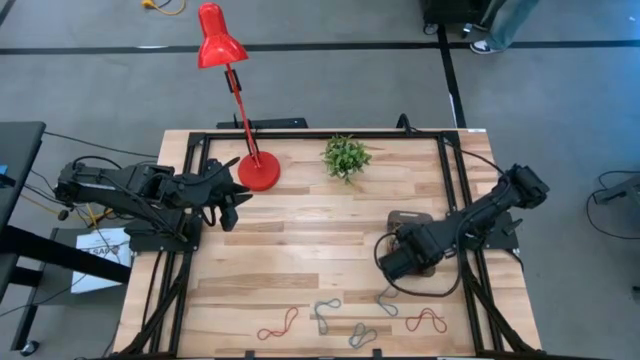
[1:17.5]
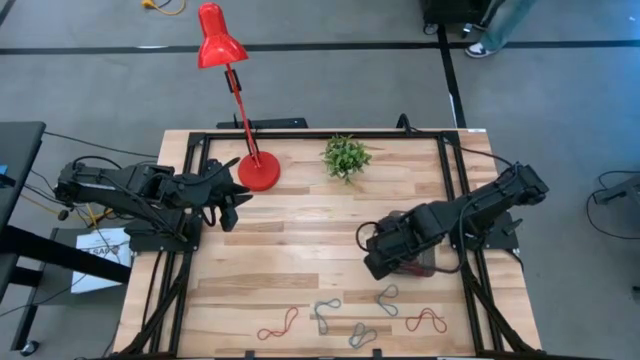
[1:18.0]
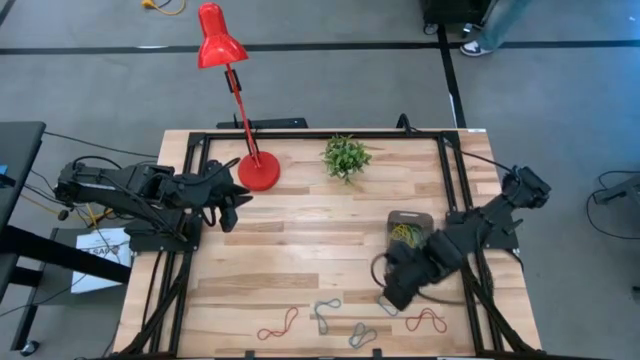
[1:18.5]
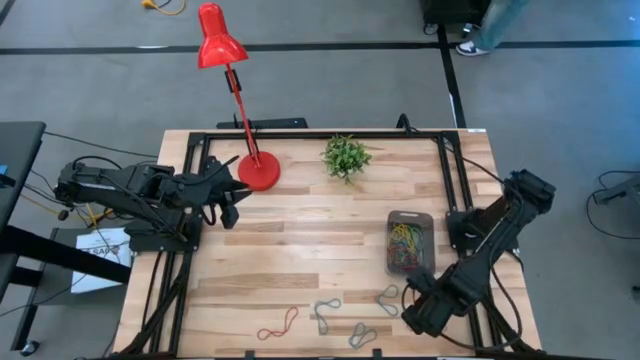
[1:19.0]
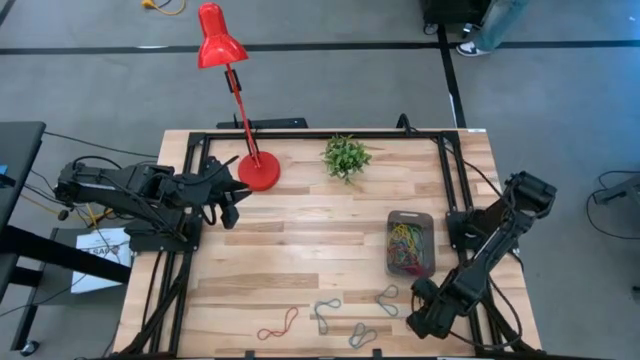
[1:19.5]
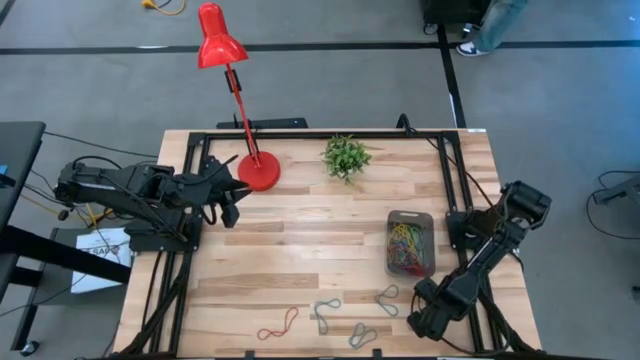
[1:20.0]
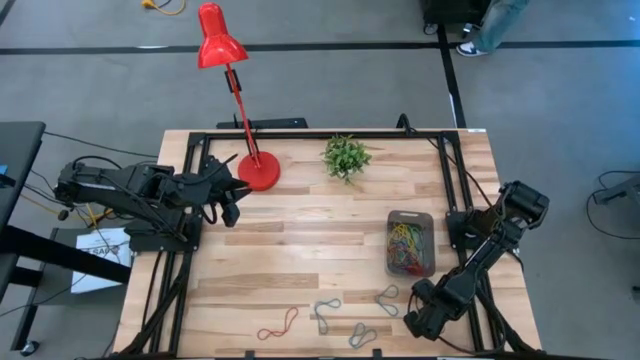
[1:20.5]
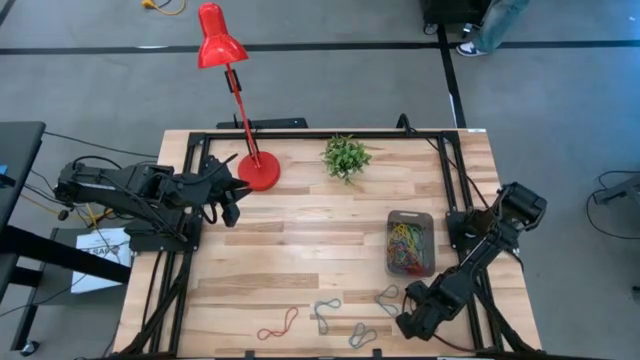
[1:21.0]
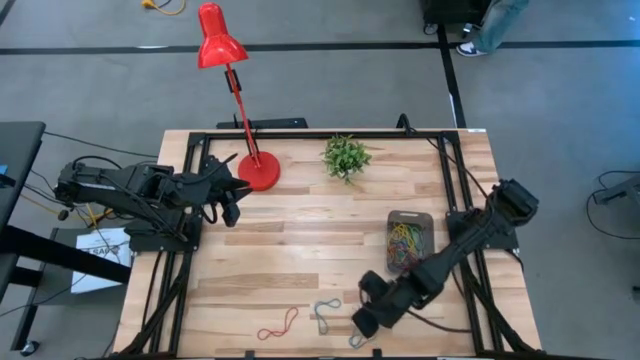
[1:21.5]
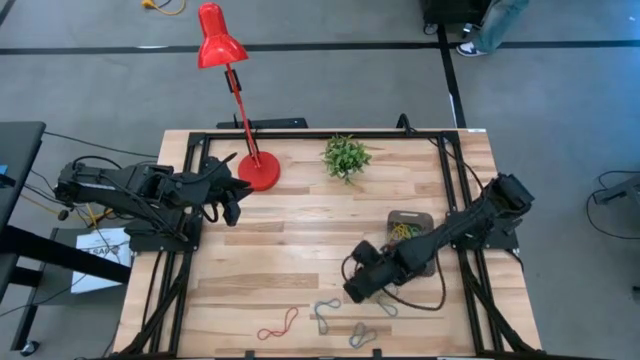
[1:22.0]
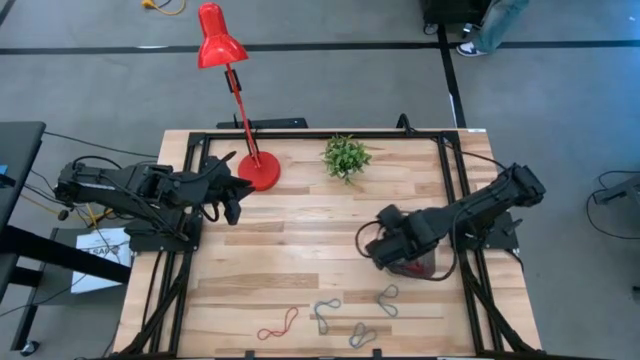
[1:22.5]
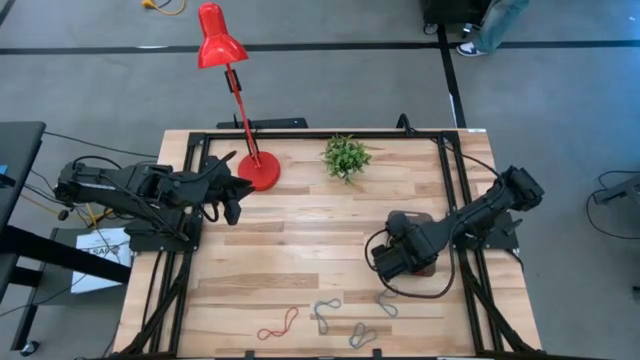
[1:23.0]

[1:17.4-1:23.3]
Task: Pick and place items into bin
Put the red rubber band into the black bin

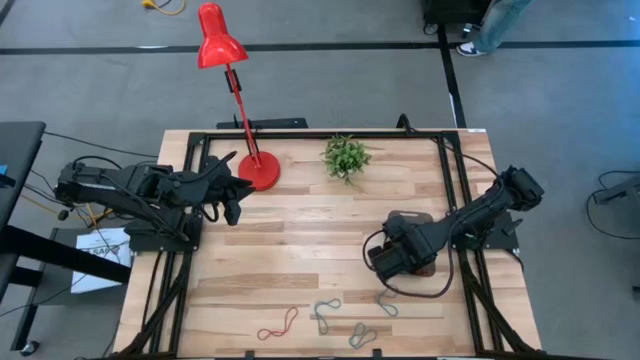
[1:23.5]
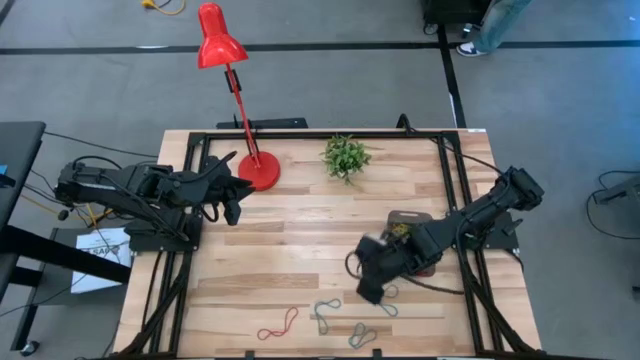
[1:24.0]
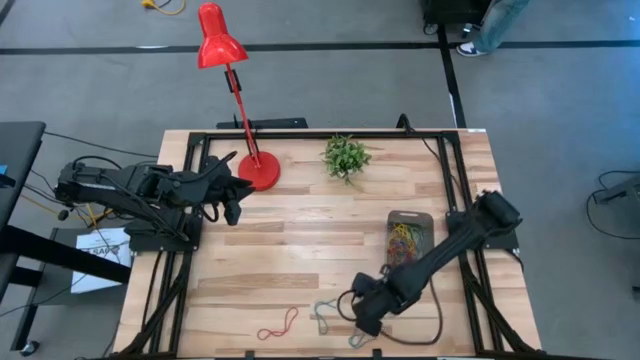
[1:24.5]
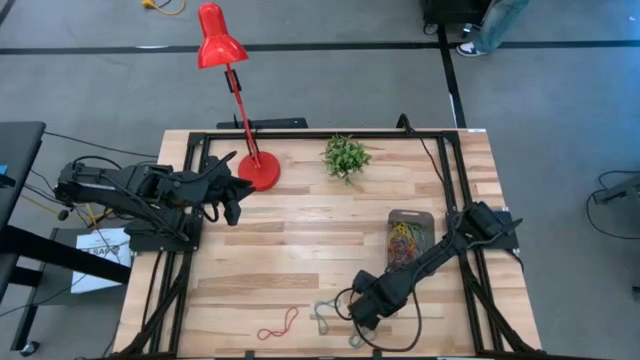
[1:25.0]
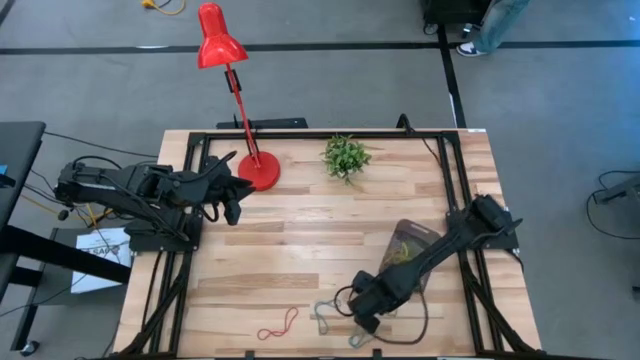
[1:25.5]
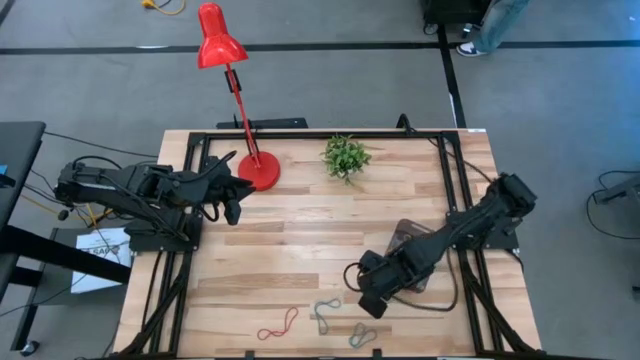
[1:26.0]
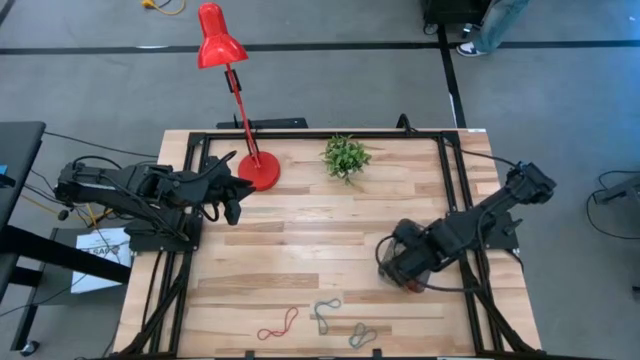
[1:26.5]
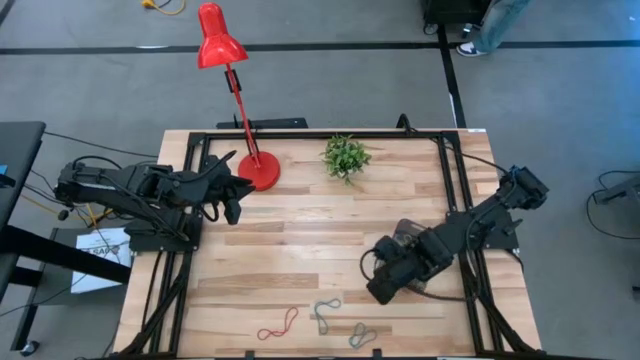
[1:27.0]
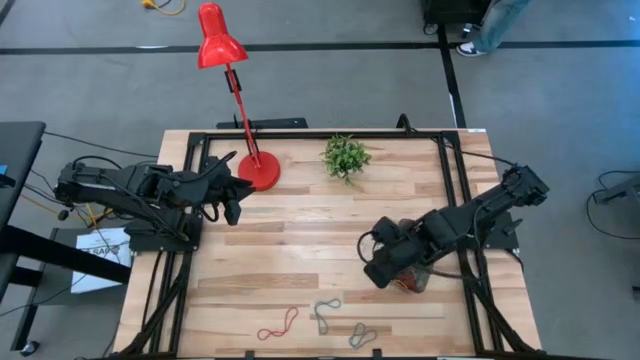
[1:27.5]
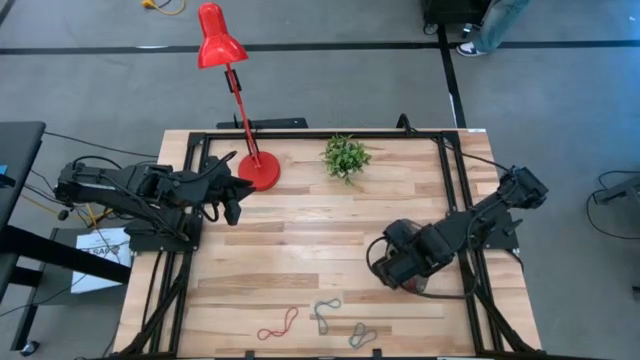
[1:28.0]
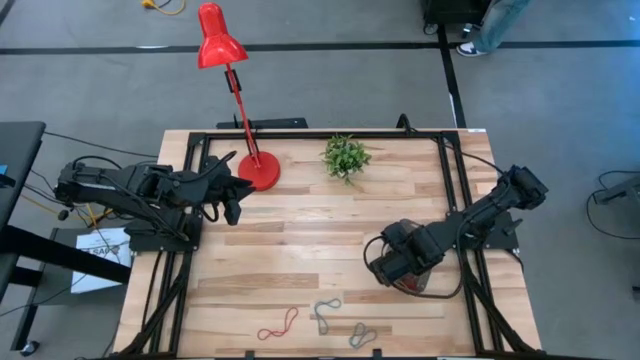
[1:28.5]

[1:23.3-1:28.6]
Put the blue rubber band into the black bin

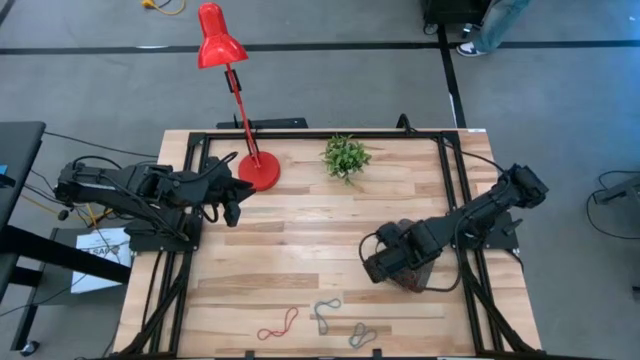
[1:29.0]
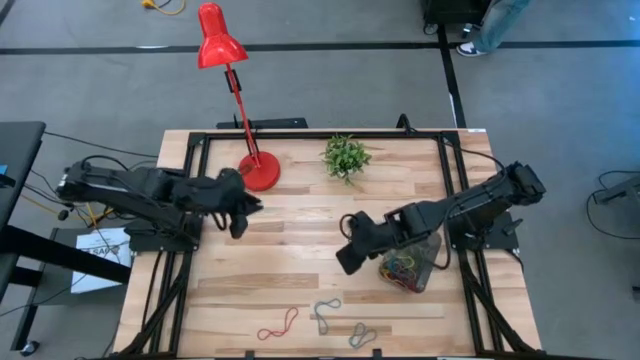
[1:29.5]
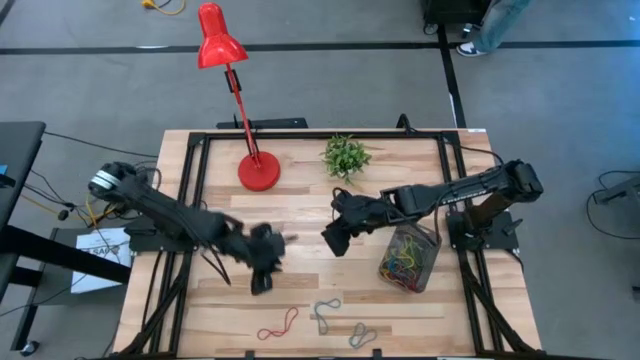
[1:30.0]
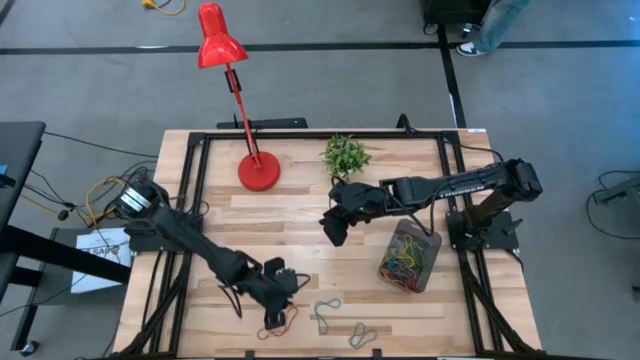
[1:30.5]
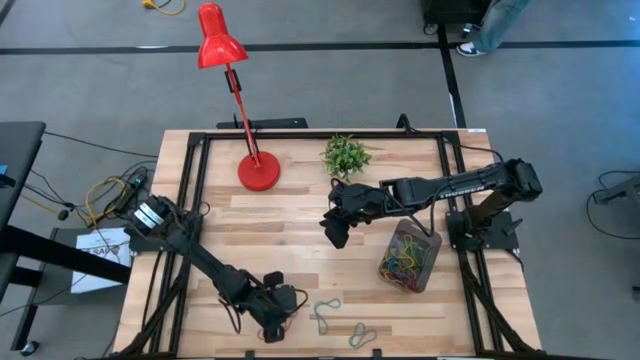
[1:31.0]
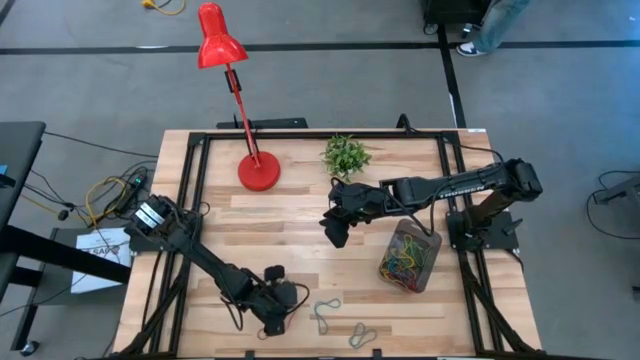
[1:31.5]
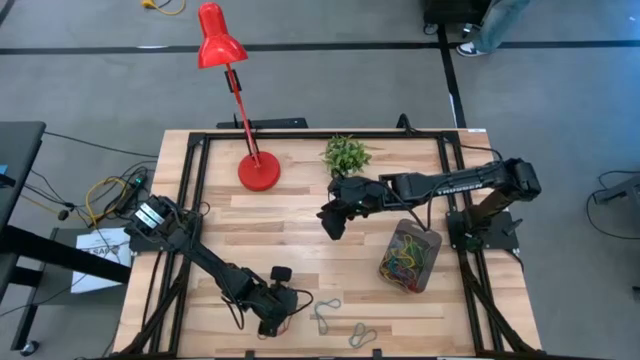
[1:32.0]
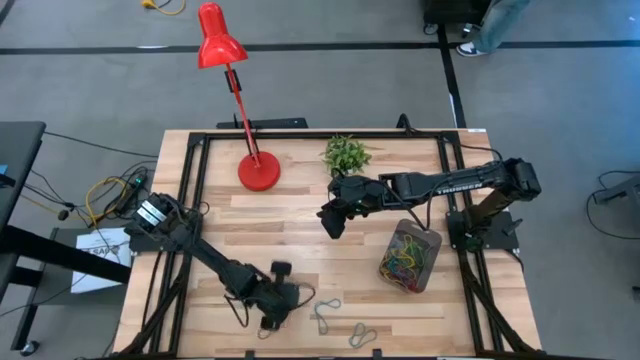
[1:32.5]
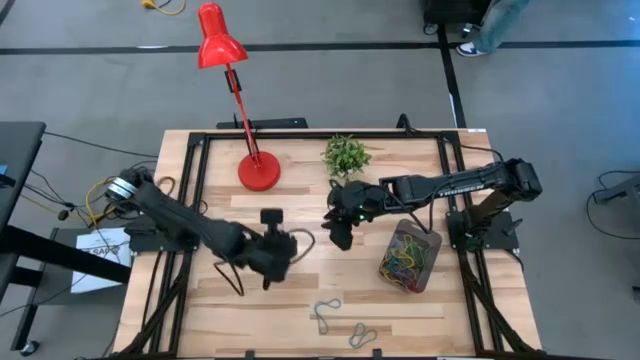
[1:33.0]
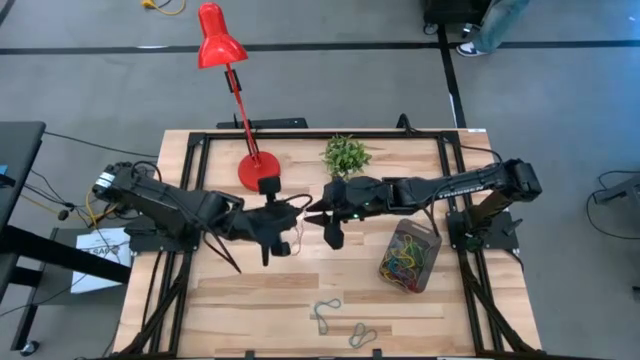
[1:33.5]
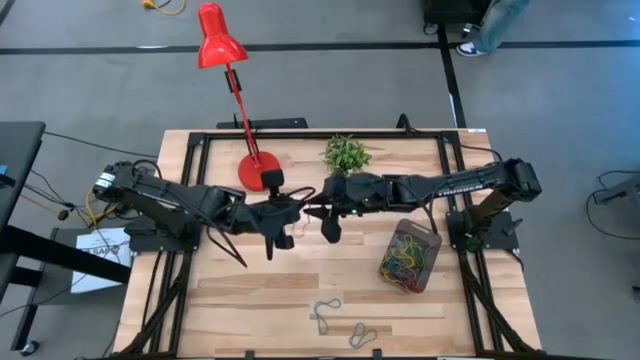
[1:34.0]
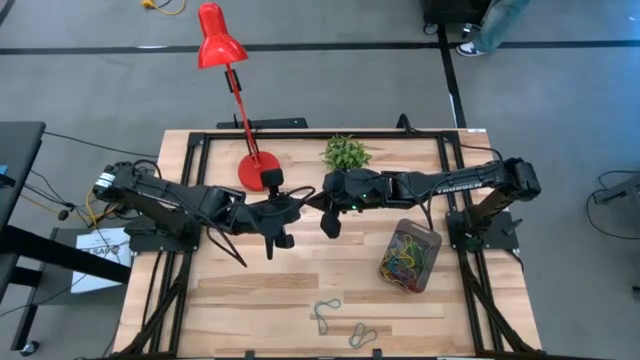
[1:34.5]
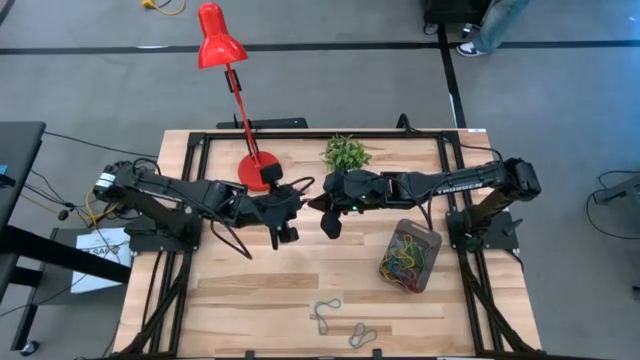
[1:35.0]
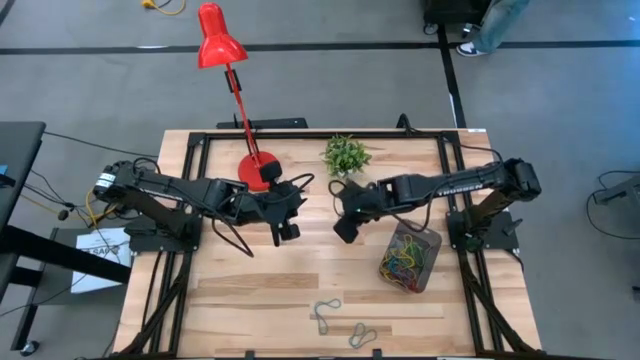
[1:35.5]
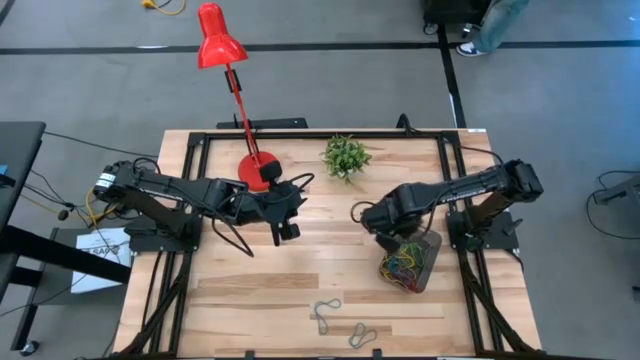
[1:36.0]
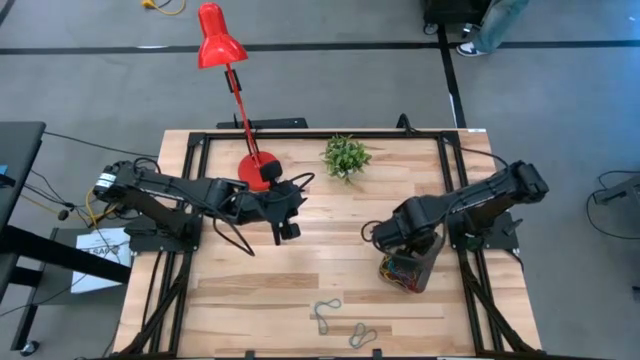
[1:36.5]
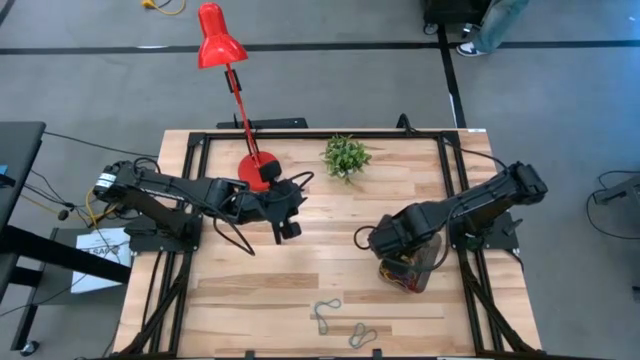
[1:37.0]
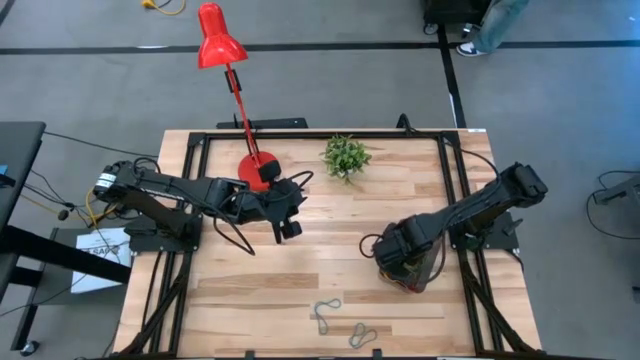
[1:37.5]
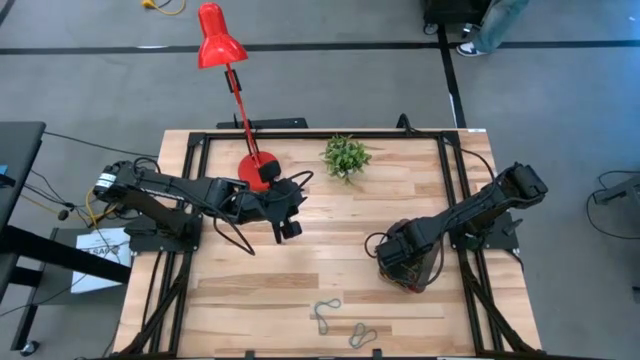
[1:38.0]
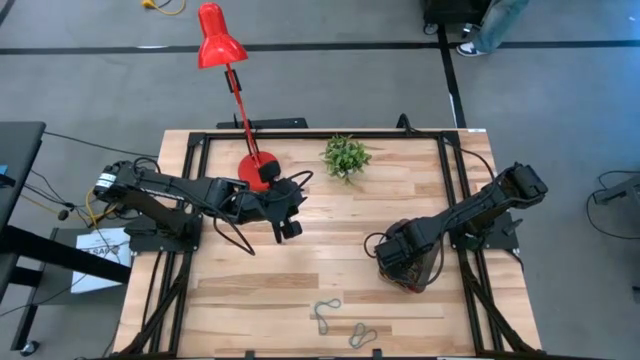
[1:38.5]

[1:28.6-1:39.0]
Put the red rubber band into the black bin

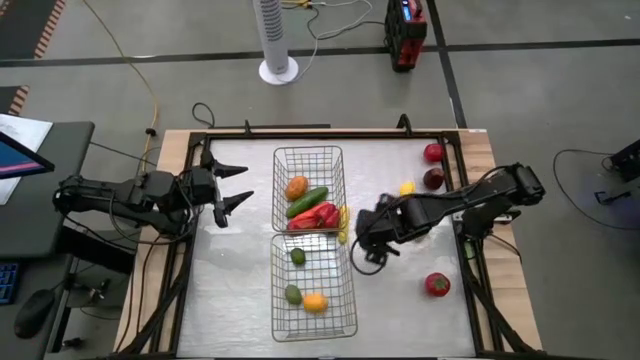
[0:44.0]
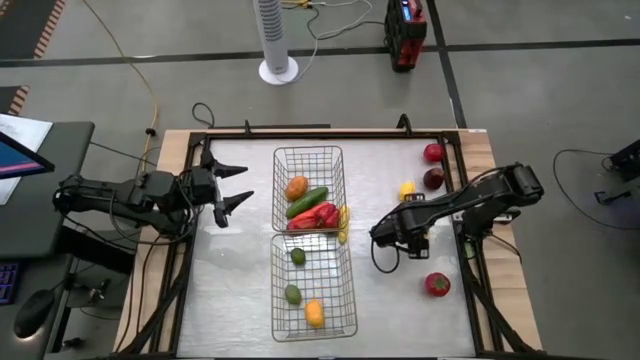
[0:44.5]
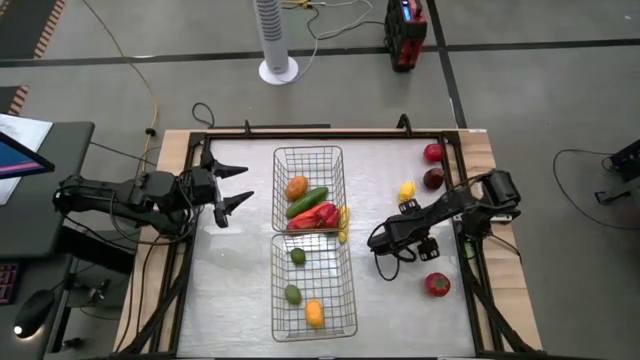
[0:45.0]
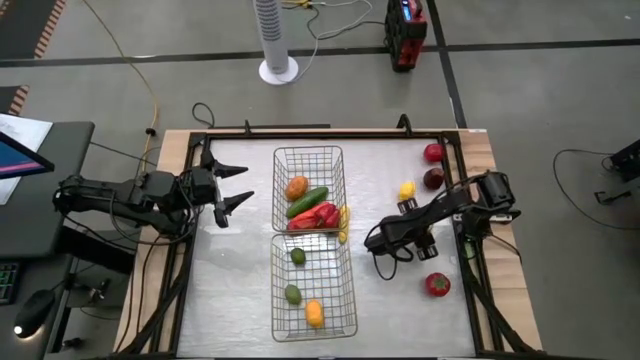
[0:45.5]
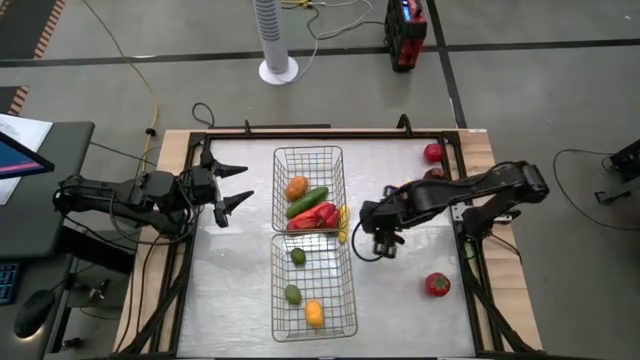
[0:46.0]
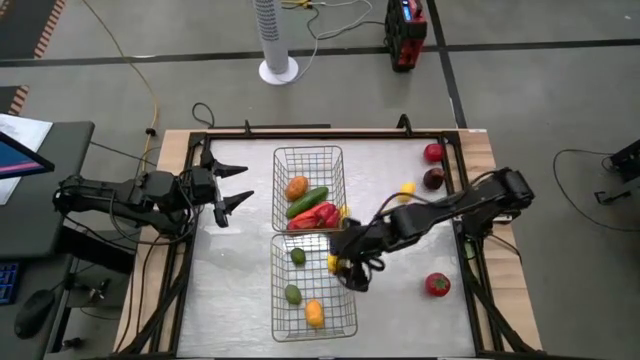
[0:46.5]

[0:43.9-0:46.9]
Task: Sort produce into baskets
Put the lemon into the bottom wire basket
